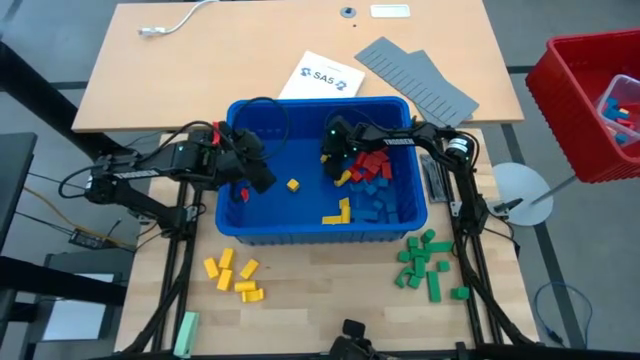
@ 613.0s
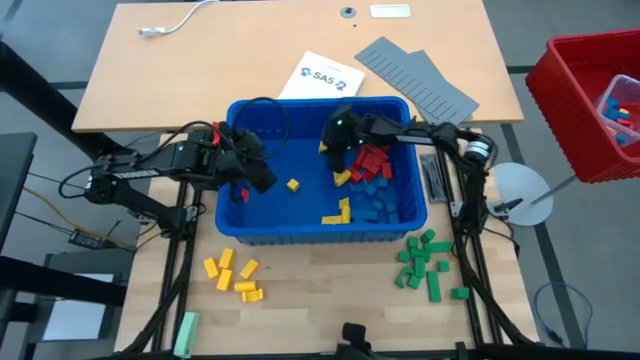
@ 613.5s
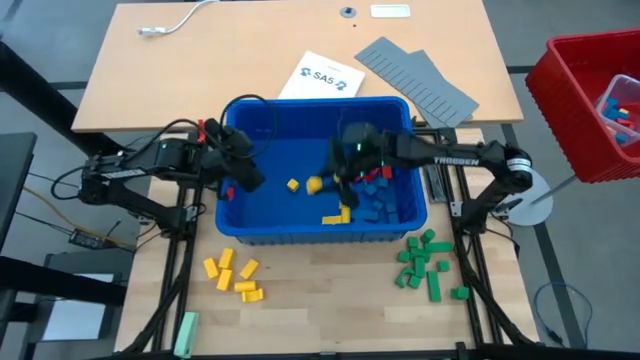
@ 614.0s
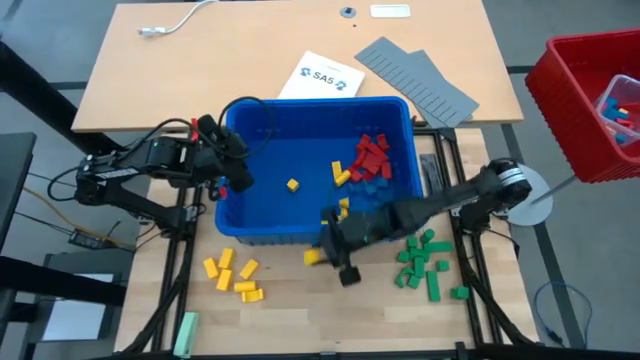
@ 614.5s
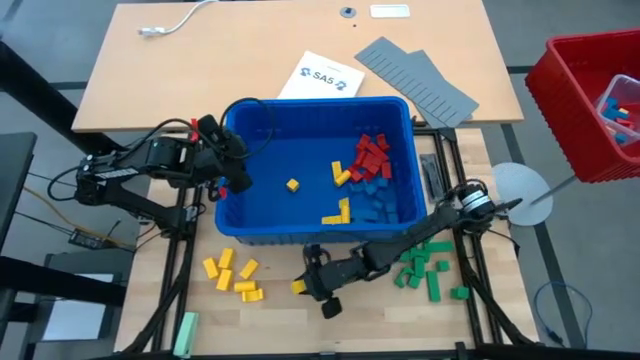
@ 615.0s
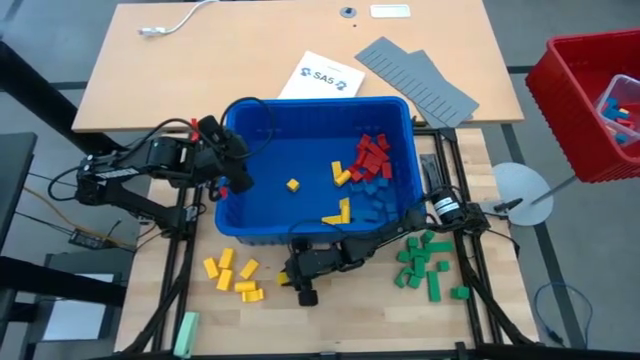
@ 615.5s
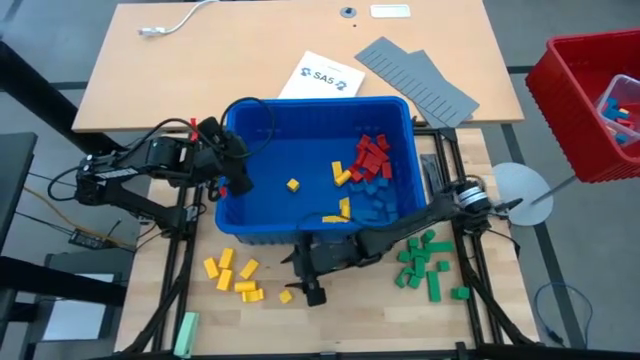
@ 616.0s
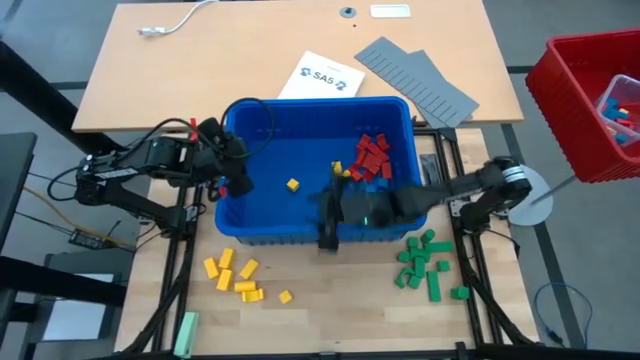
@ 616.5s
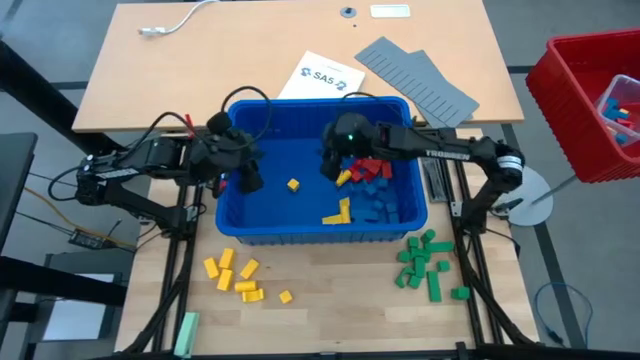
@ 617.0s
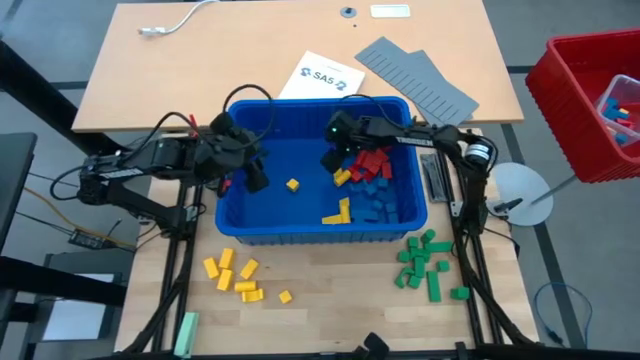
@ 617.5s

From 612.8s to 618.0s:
Task: Sort blocks
Remove the yellow block from the blue bin

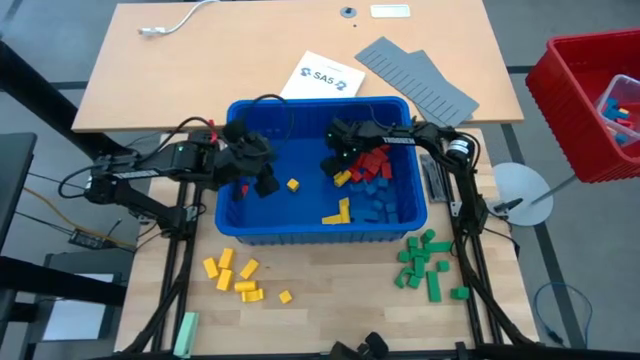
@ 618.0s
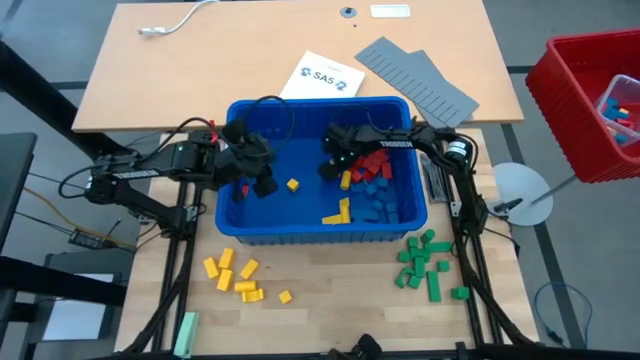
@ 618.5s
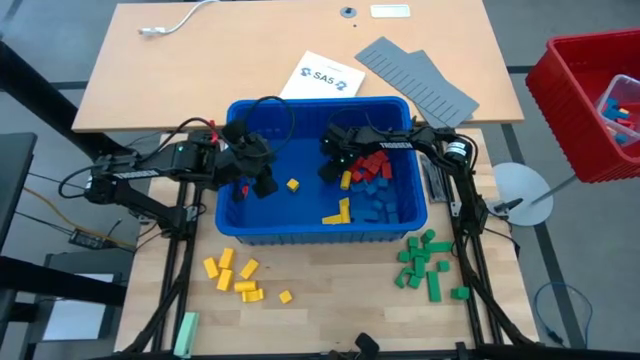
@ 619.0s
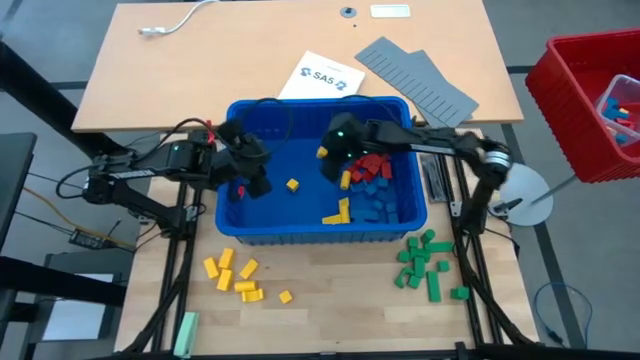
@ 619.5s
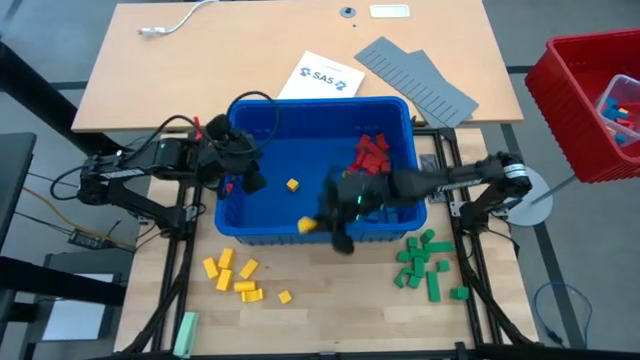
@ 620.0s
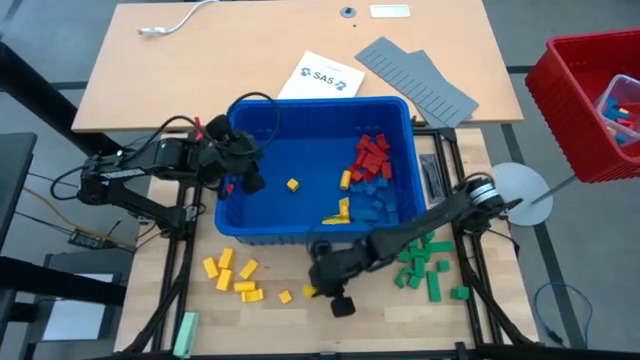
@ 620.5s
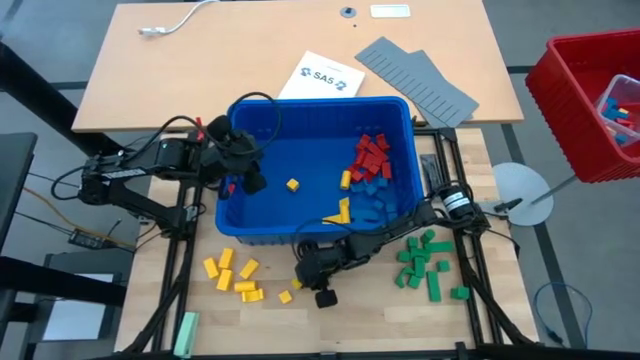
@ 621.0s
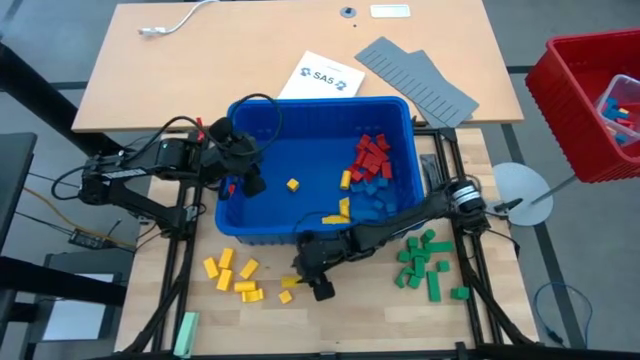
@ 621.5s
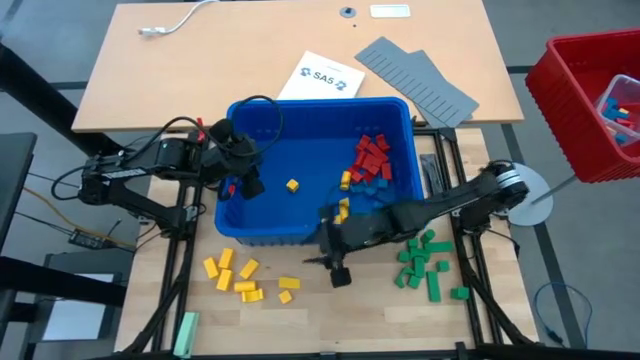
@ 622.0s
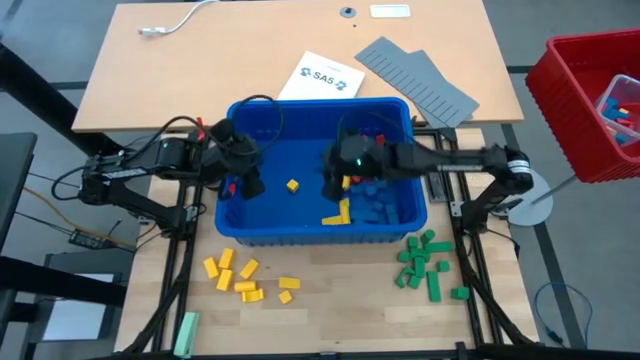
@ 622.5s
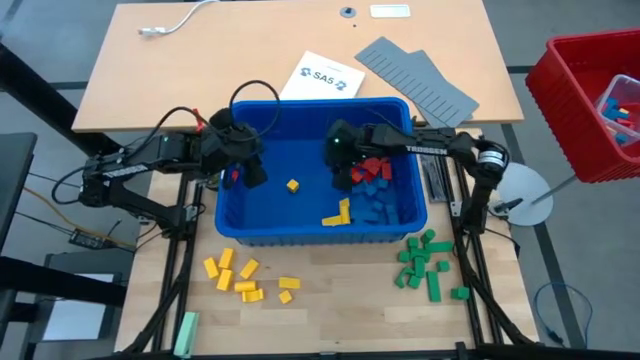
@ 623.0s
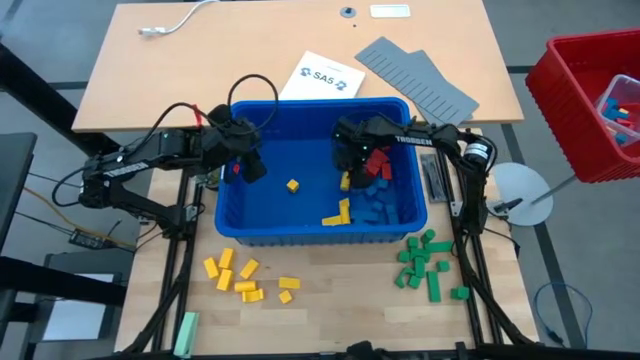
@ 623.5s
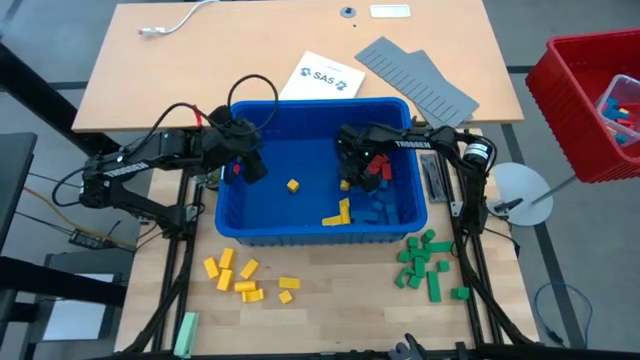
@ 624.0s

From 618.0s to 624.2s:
Remove the yellow block from the blue bin

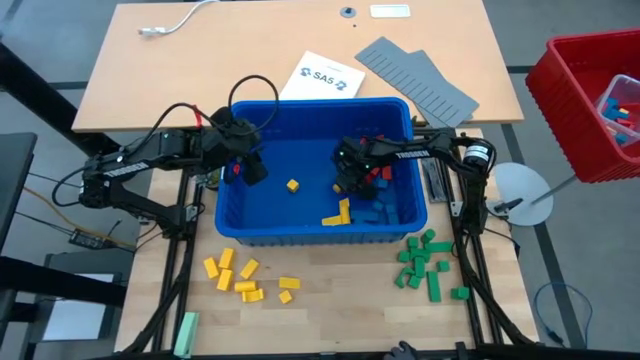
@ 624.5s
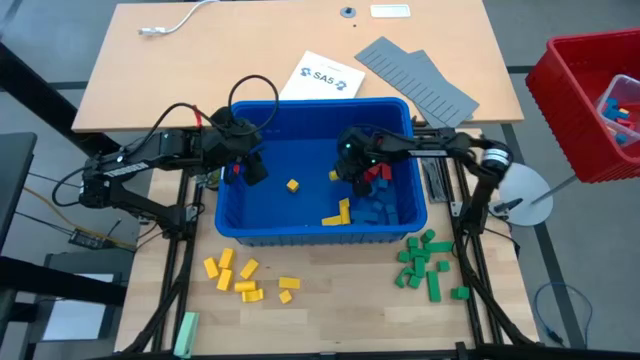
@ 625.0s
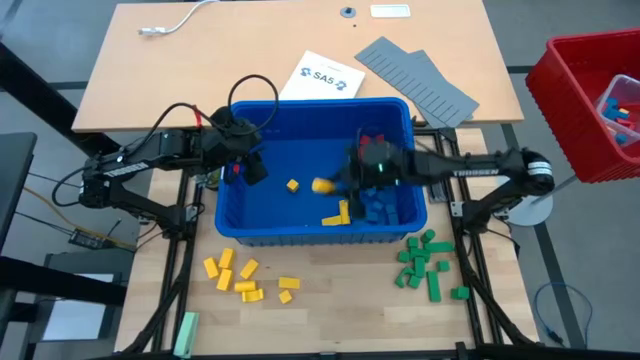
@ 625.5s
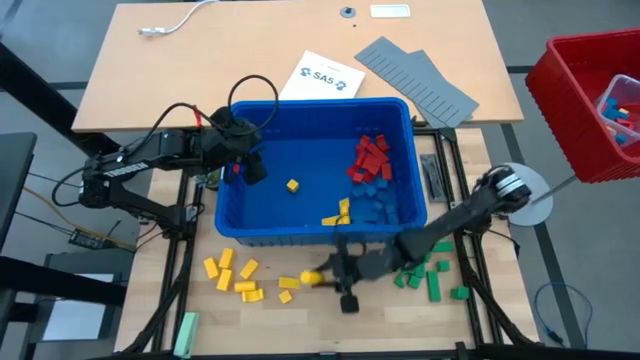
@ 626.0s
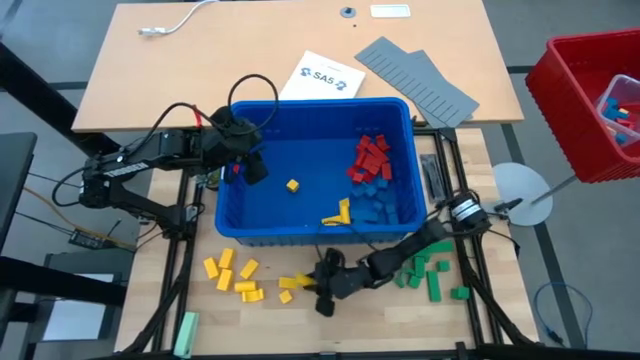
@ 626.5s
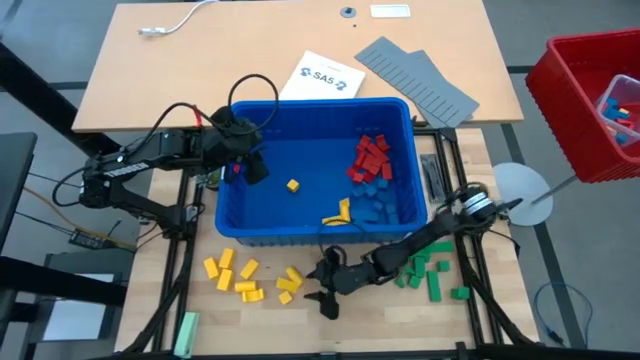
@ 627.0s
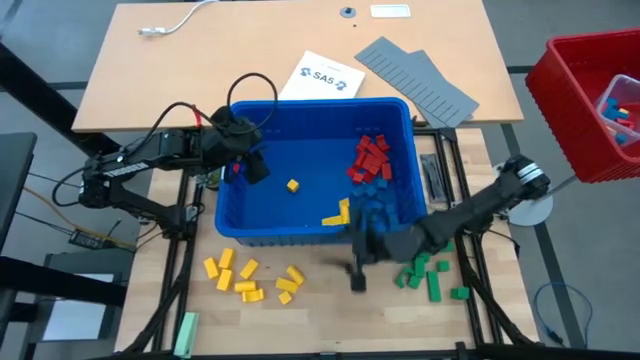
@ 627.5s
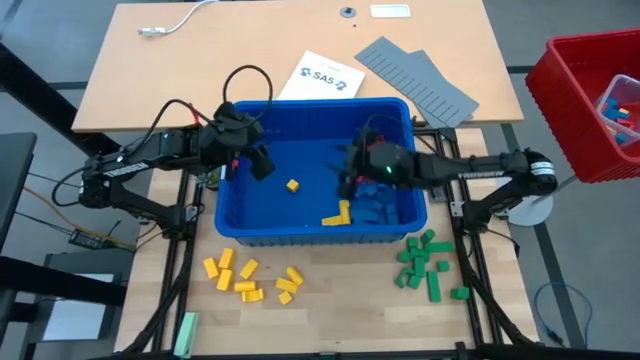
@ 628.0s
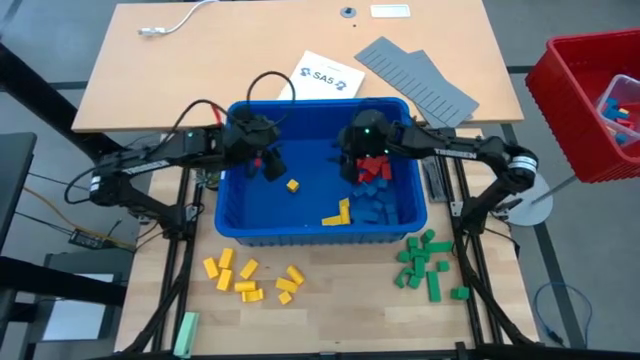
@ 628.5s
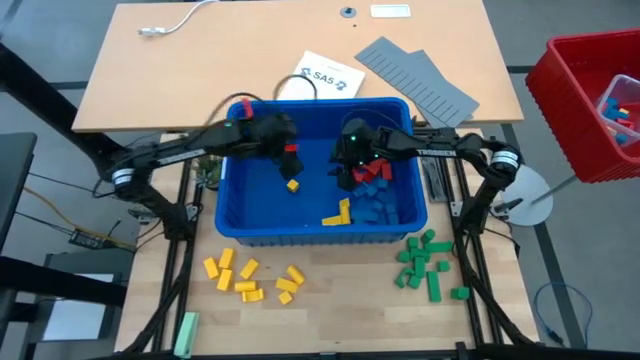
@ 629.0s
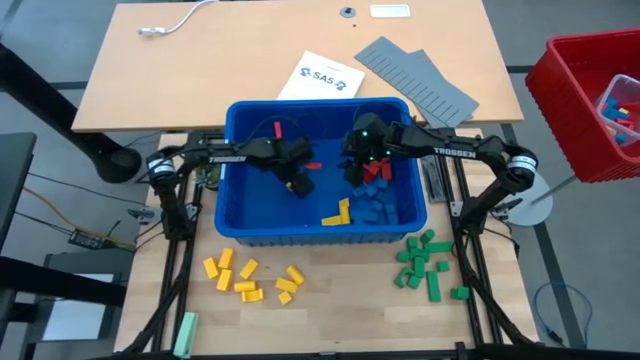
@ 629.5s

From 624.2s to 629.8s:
Remove the yellow block from the blue bin

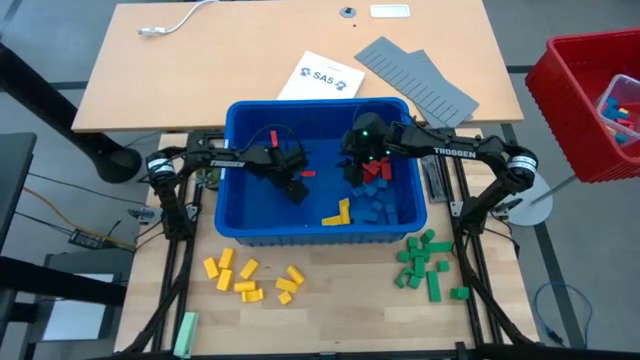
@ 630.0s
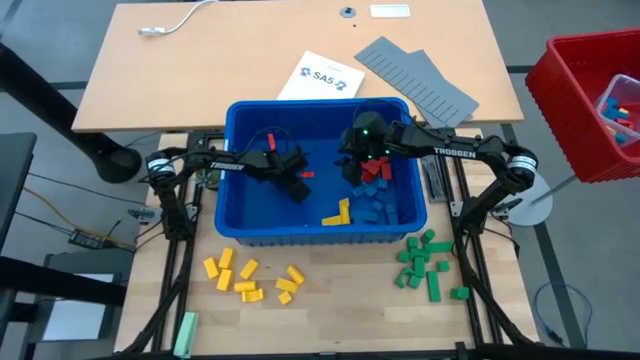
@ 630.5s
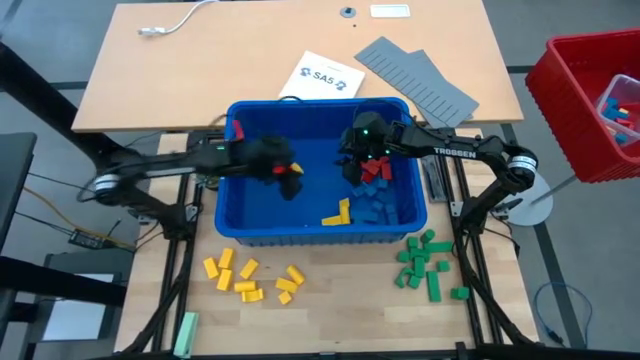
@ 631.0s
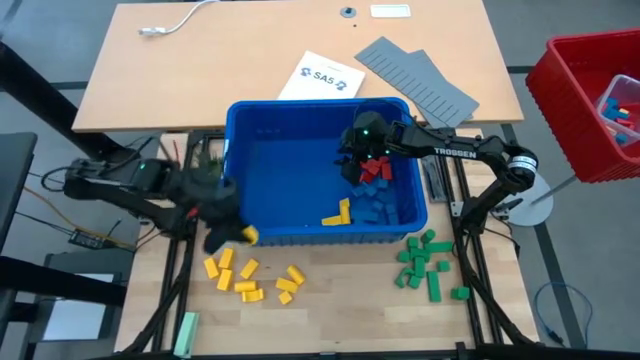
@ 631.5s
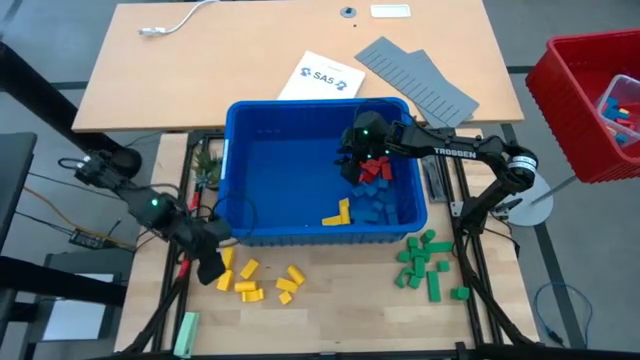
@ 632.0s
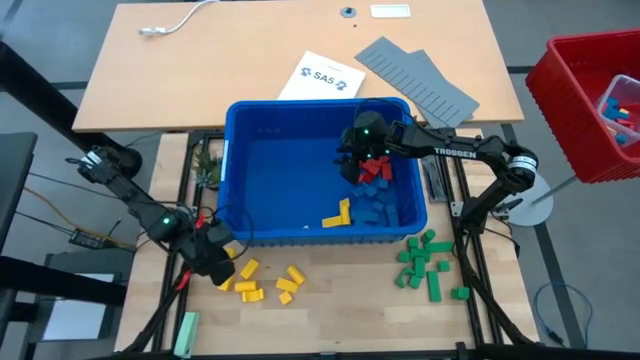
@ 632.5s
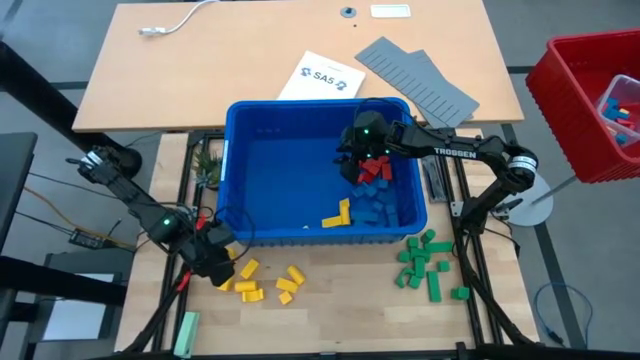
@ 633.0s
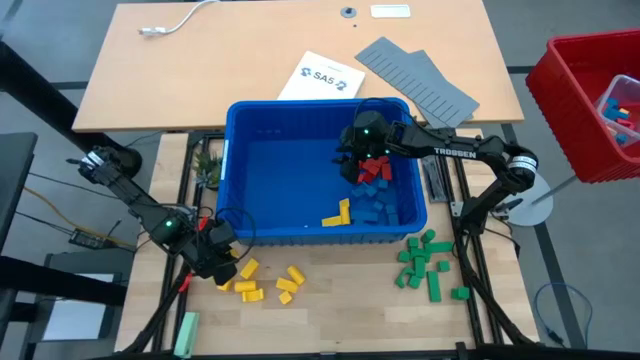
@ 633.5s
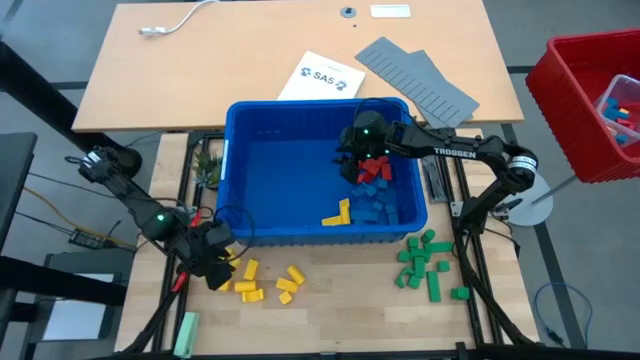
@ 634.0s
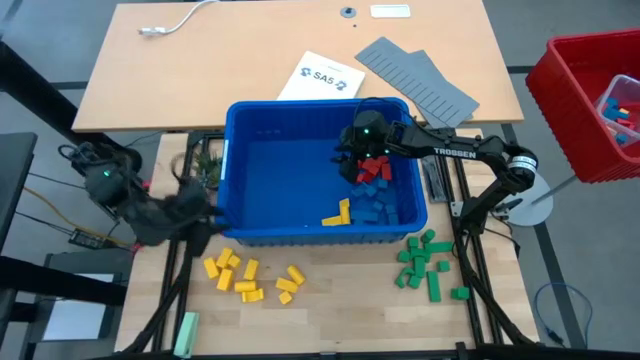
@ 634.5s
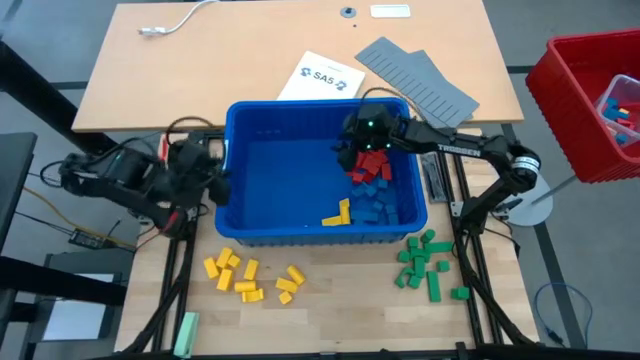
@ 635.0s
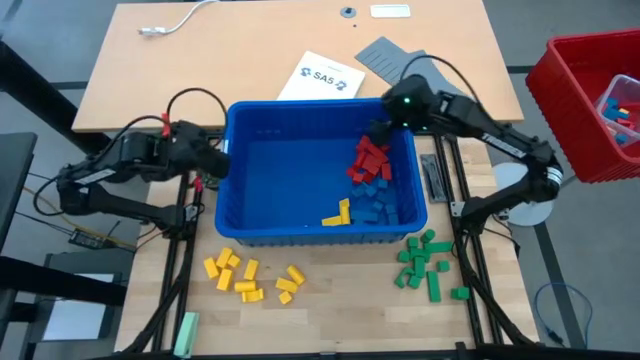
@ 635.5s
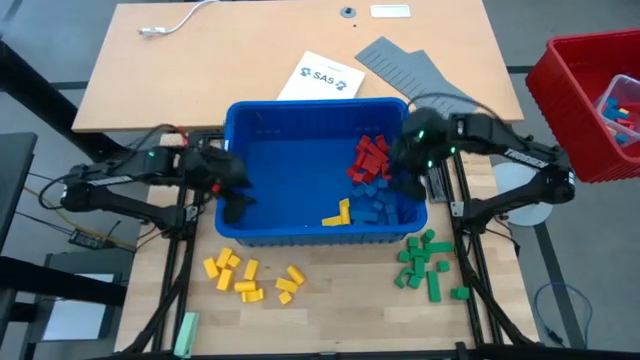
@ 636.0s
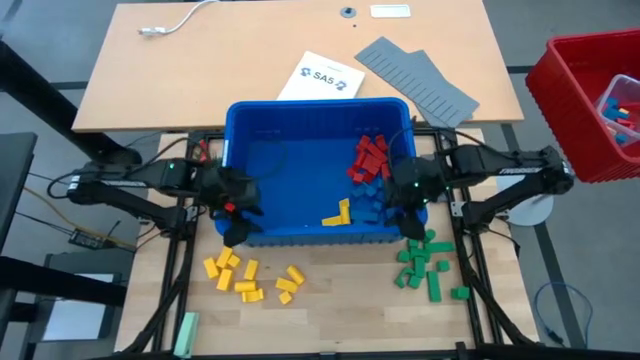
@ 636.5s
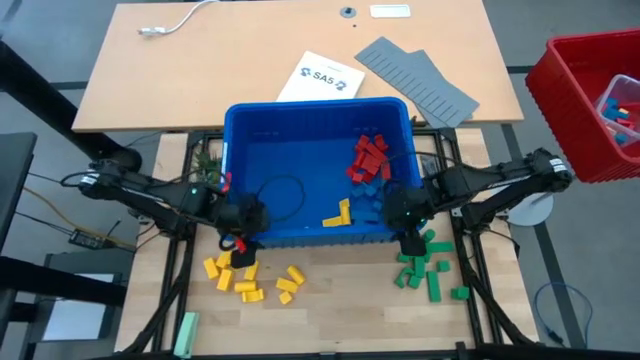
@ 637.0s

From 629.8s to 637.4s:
Remove the yellow block from the blue bin
